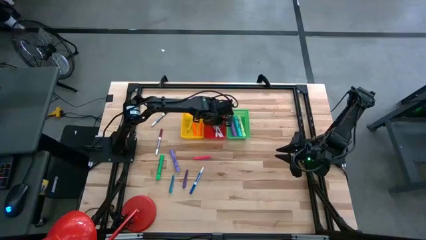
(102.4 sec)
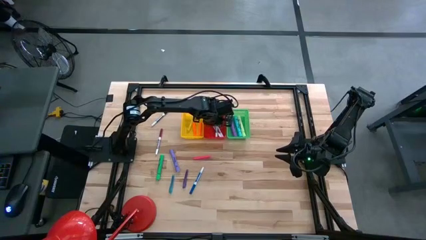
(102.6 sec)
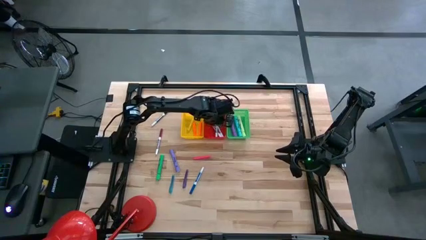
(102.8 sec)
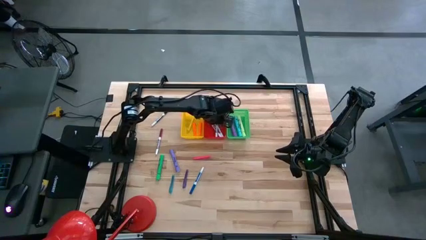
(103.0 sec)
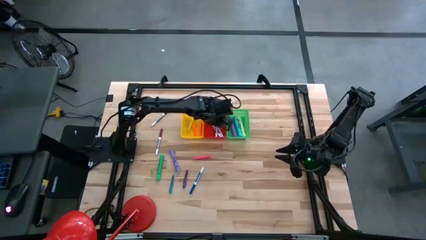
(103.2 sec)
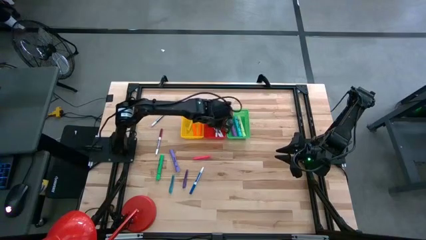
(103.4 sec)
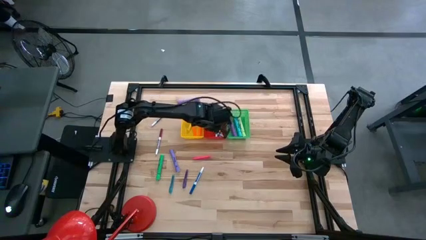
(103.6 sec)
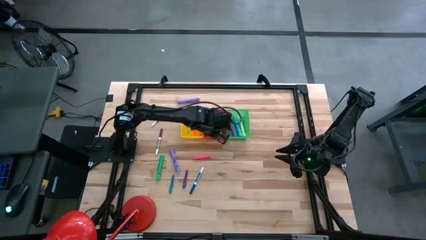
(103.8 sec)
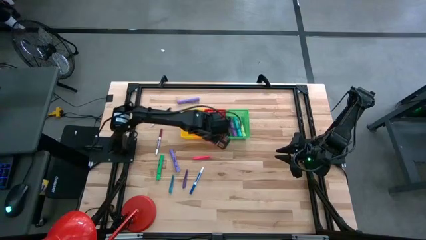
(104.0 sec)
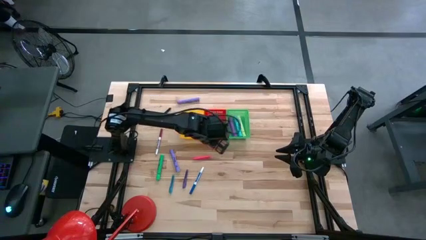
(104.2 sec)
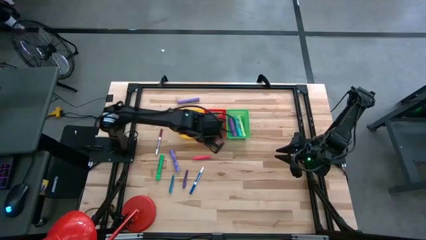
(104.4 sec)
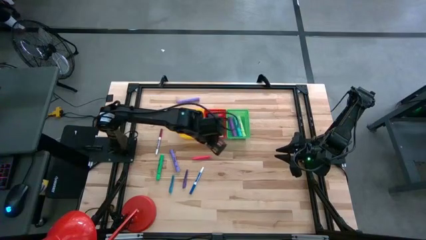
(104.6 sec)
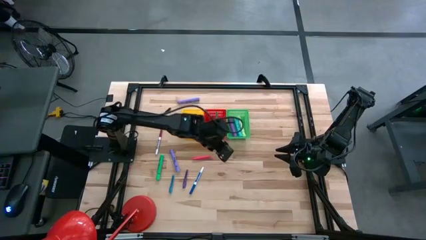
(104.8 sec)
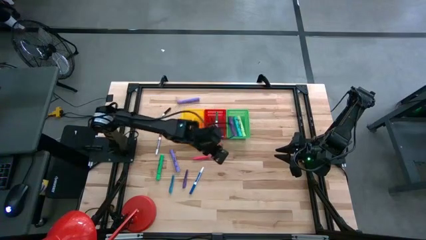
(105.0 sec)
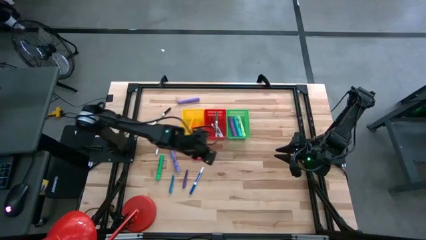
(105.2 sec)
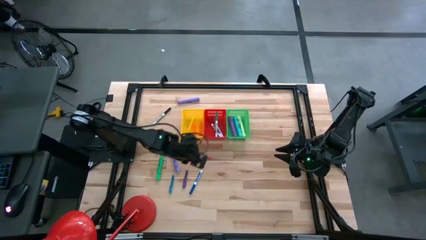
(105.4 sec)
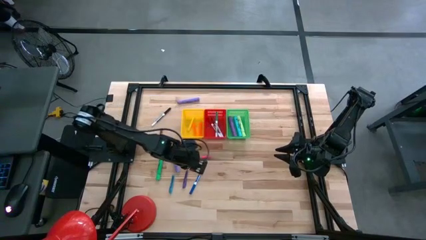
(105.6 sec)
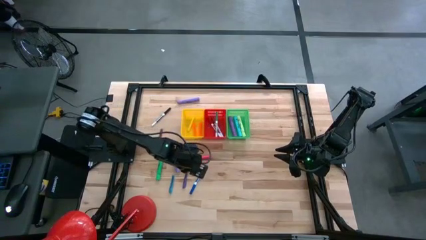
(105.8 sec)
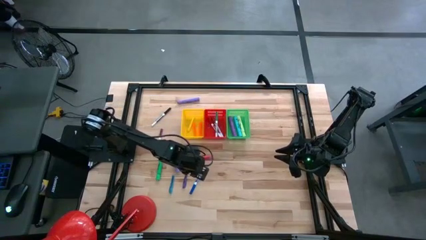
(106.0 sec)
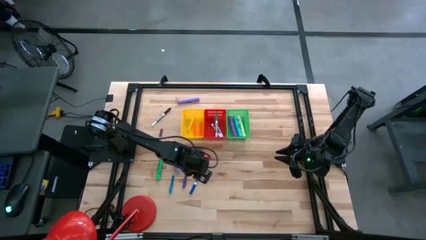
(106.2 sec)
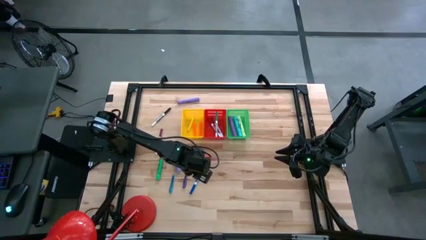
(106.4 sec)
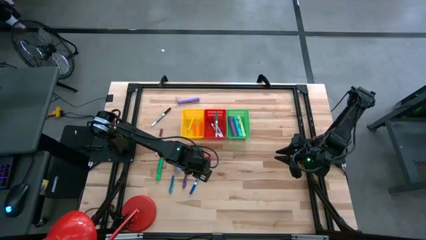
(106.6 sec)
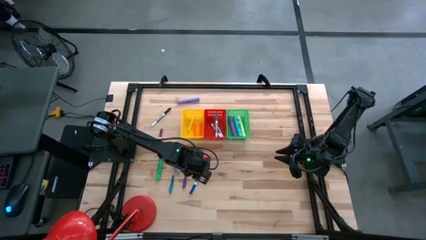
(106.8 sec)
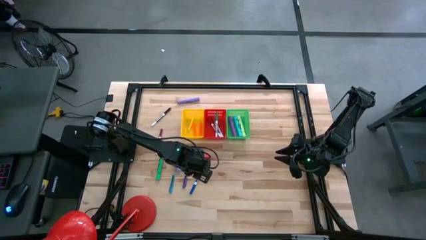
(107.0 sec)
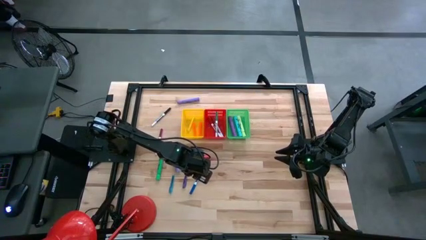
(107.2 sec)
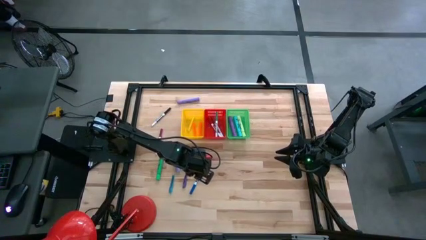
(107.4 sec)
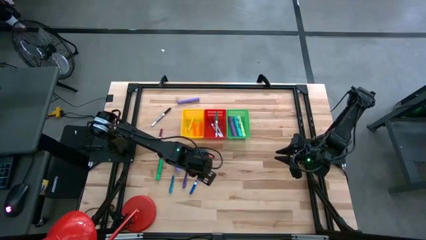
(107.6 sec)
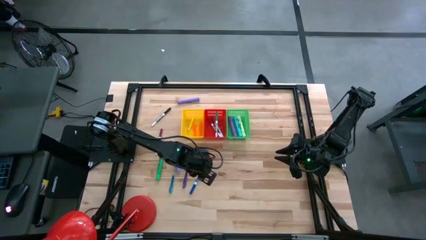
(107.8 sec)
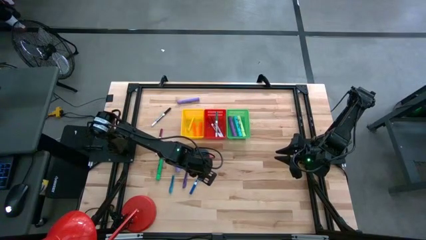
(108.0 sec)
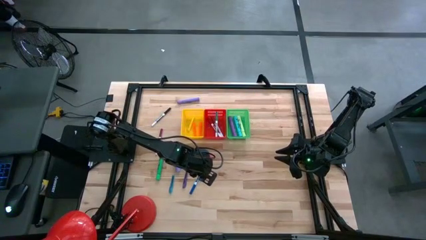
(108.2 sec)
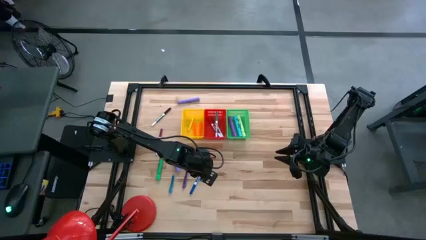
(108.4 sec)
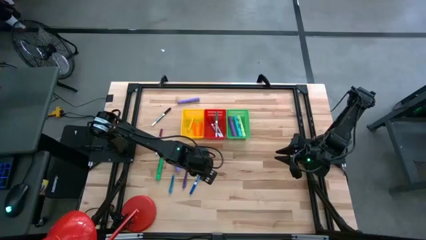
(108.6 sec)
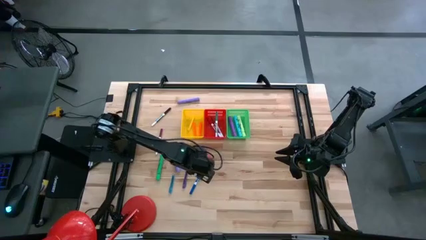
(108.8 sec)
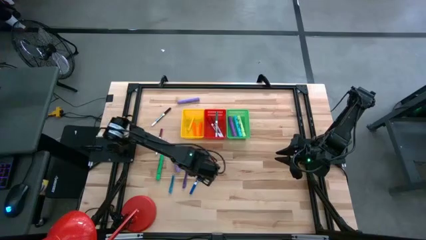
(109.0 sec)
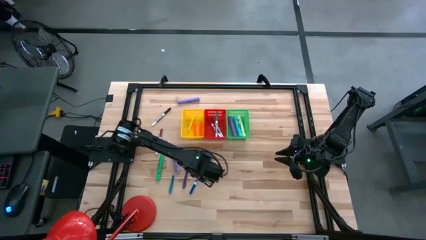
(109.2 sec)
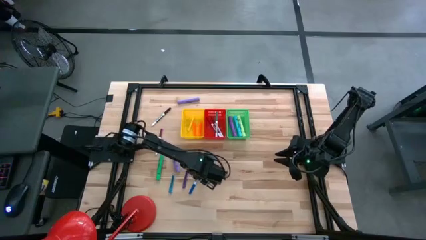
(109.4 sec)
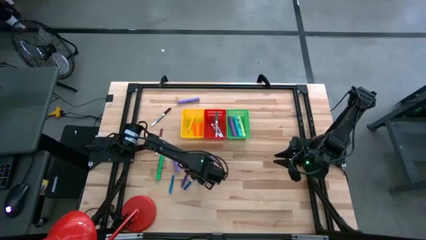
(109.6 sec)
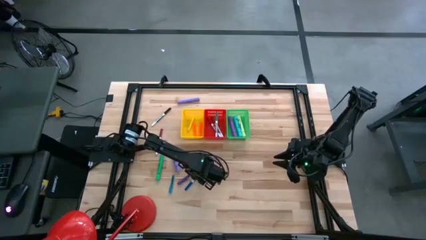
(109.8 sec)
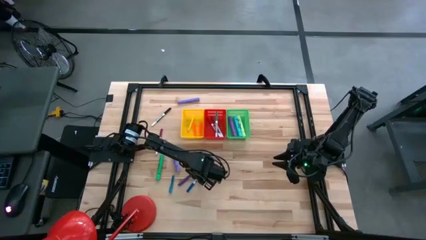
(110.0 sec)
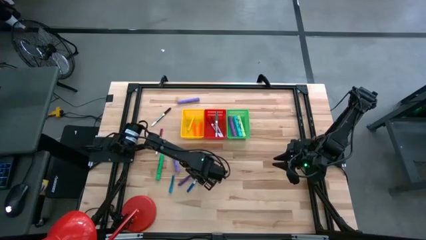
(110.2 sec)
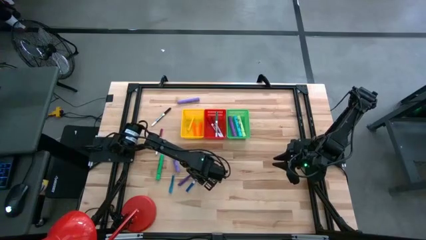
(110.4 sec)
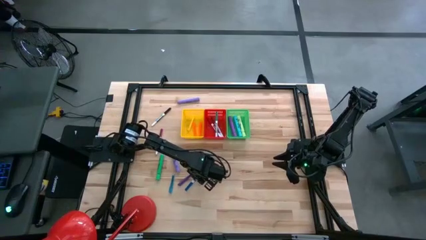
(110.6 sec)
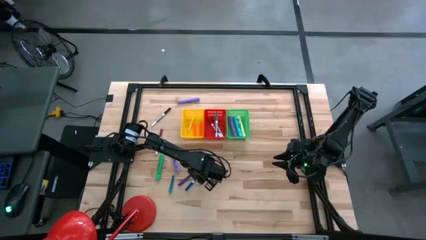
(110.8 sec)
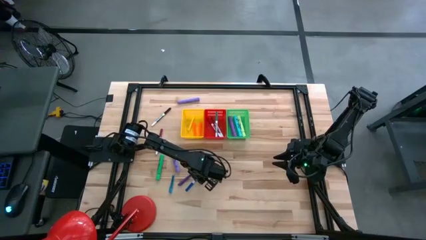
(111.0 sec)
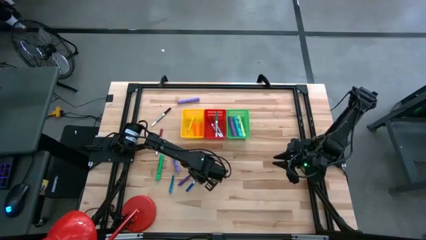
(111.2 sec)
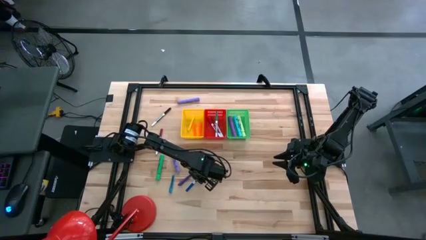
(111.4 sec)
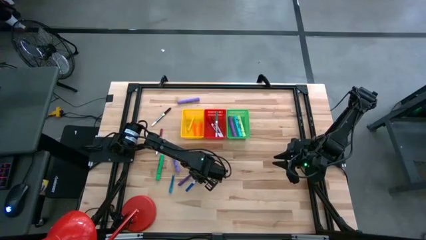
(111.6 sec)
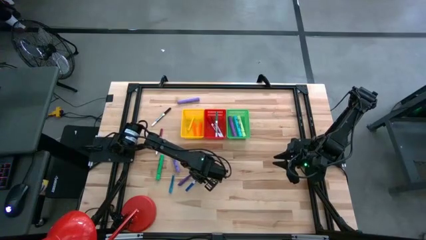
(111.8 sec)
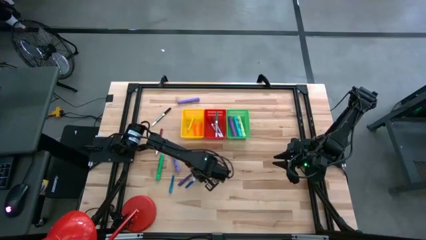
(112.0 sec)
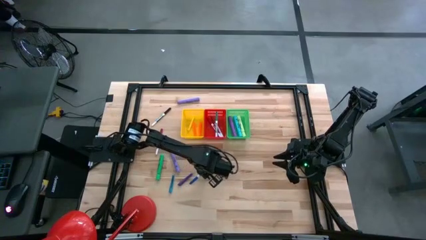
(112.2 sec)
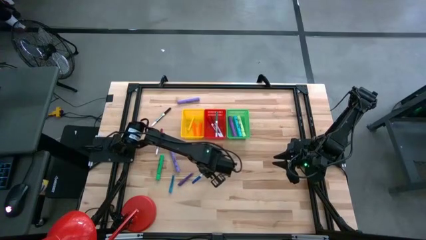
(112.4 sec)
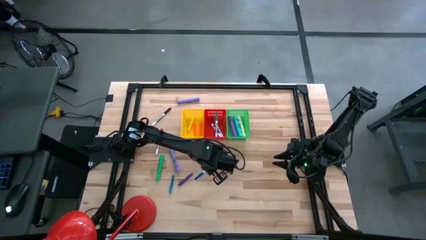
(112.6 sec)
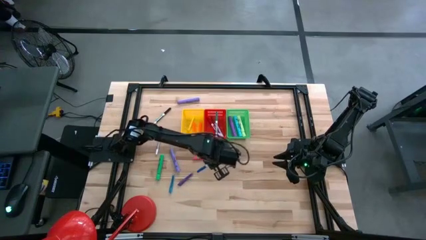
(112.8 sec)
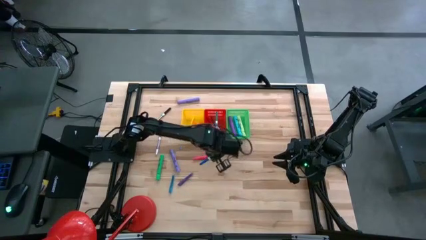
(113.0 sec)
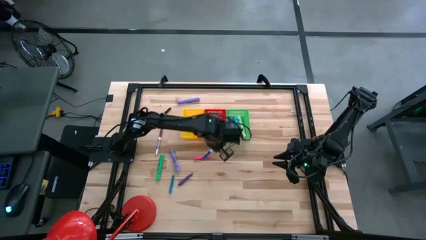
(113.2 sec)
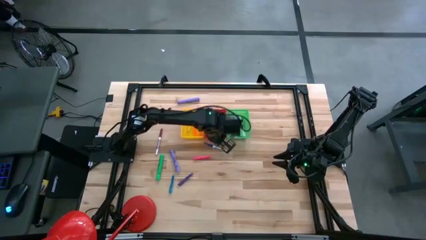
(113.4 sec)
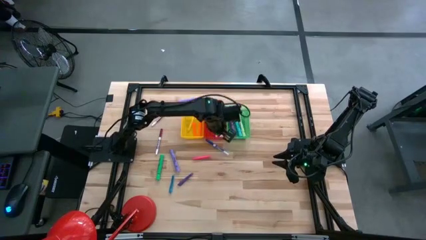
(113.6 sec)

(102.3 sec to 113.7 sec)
Task: Pick & Place Markers
Put the blue marker into the red bin

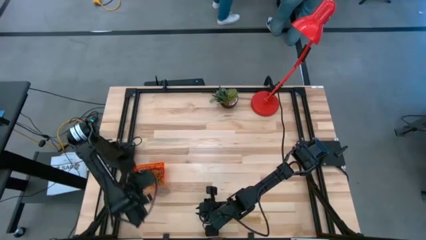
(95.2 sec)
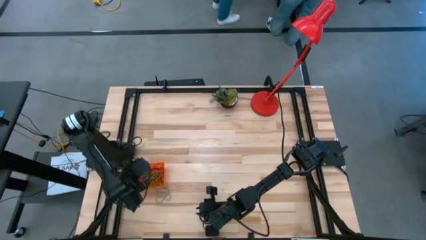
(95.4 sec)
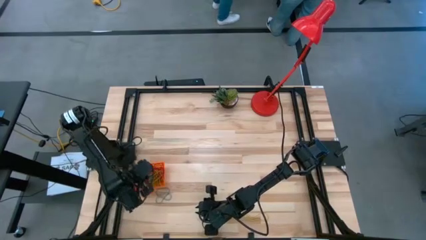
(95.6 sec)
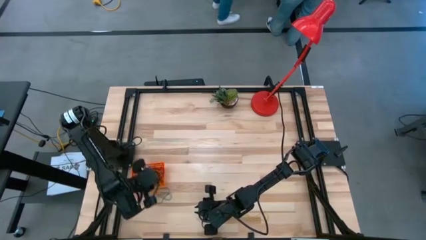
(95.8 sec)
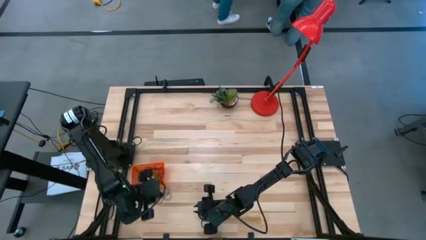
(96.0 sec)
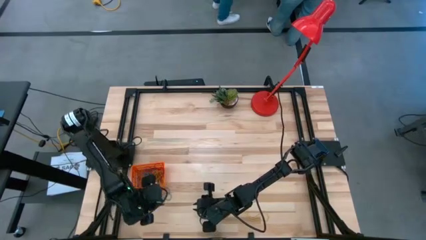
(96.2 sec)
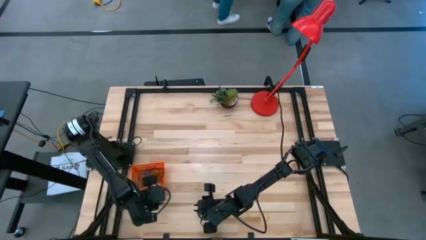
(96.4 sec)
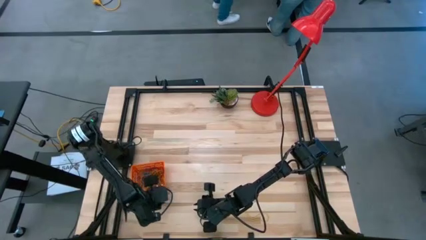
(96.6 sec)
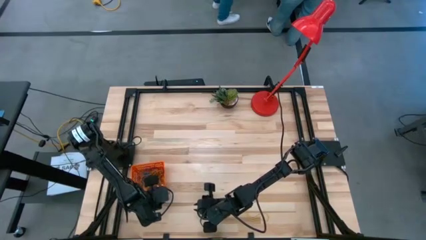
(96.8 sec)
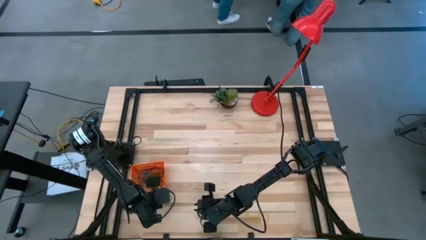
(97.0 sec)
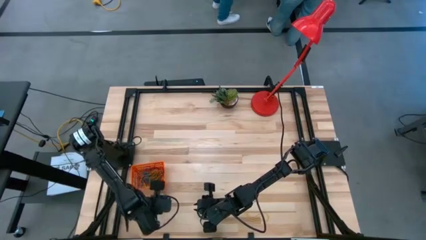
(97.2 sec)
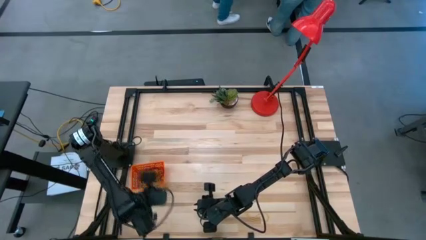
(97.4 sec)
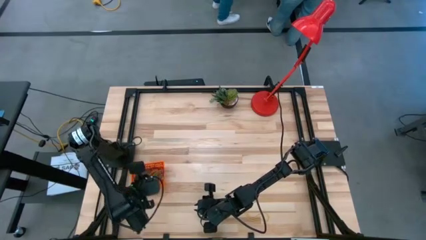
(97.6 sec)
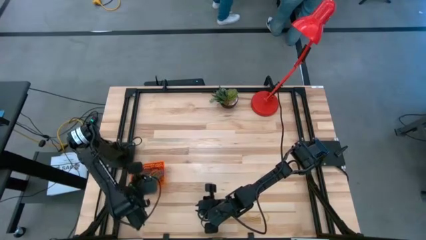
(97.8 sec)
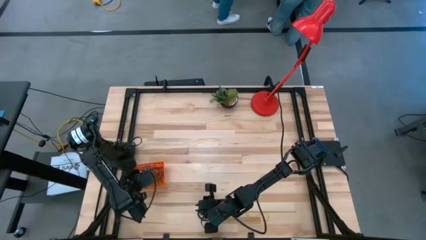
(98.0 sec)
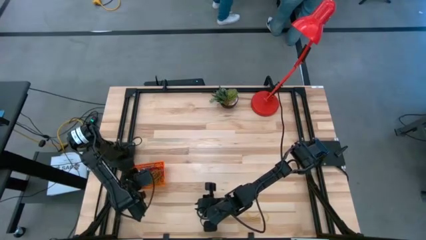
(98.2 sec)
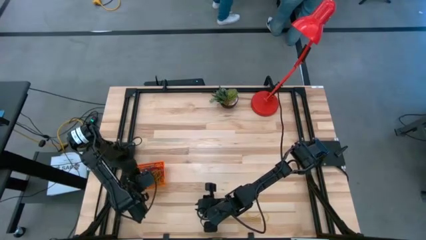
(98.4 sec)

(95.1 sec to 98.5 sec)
Task: Pick and place rubber bands into bin
Put the rubber band into the orange basket
